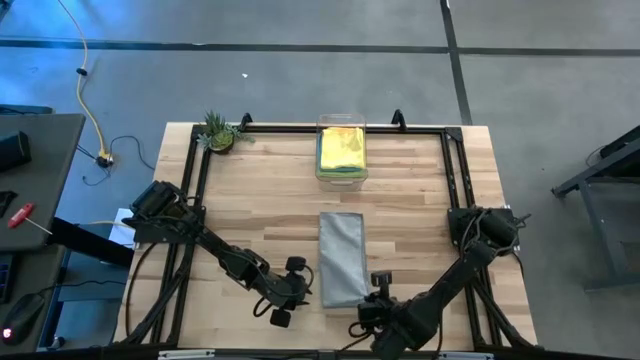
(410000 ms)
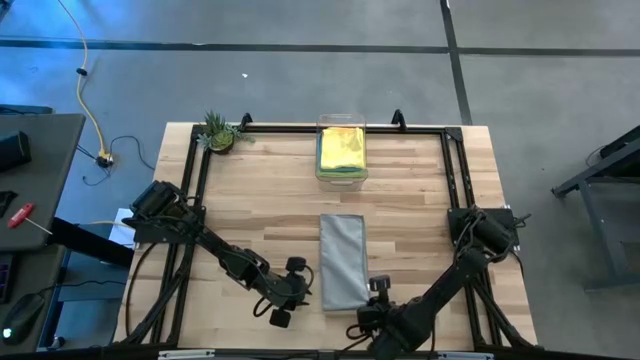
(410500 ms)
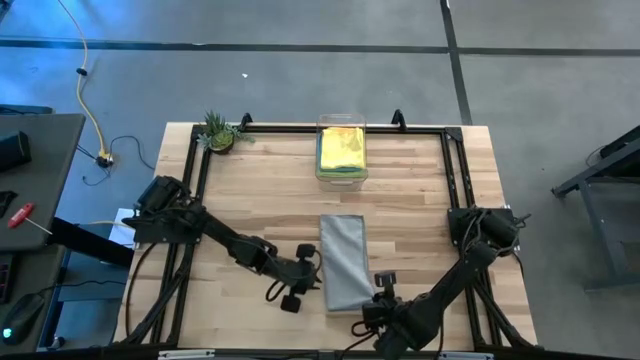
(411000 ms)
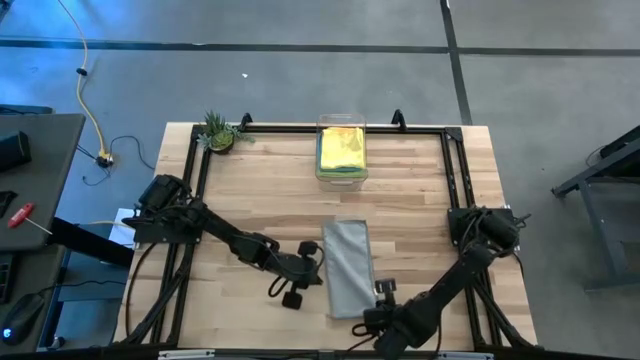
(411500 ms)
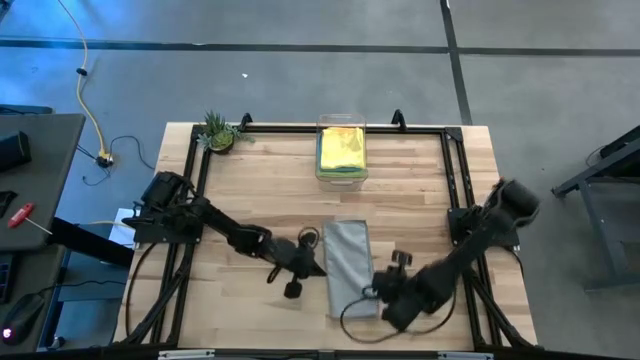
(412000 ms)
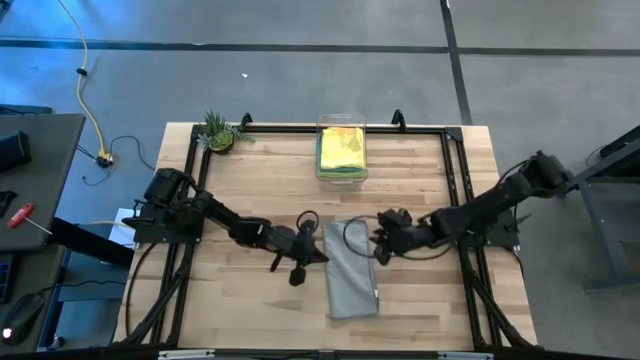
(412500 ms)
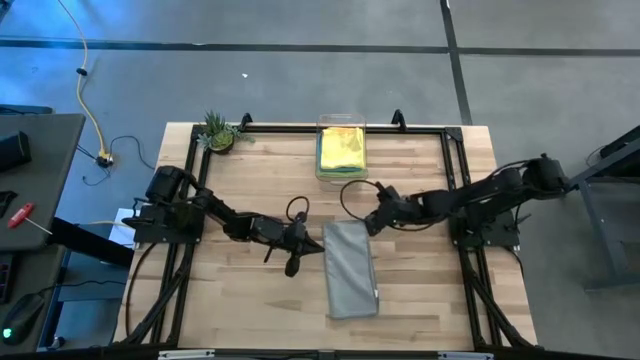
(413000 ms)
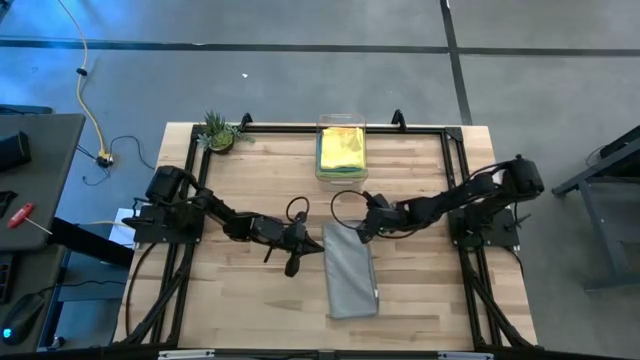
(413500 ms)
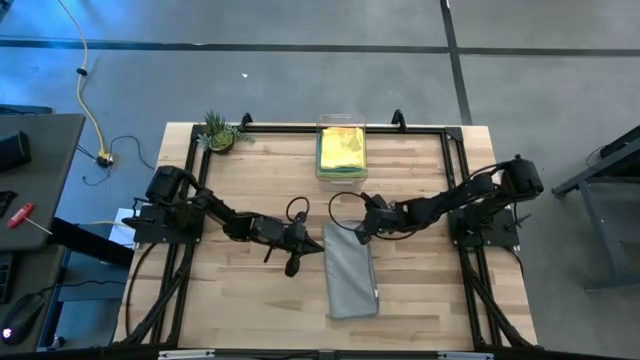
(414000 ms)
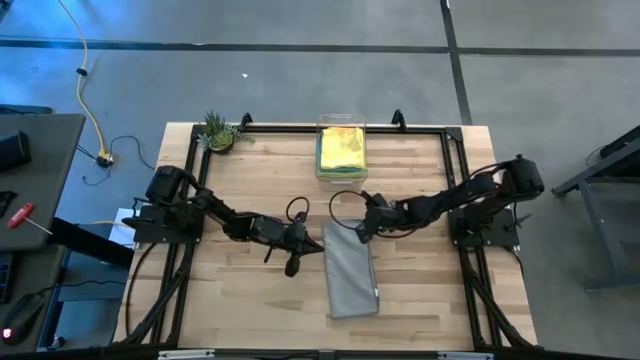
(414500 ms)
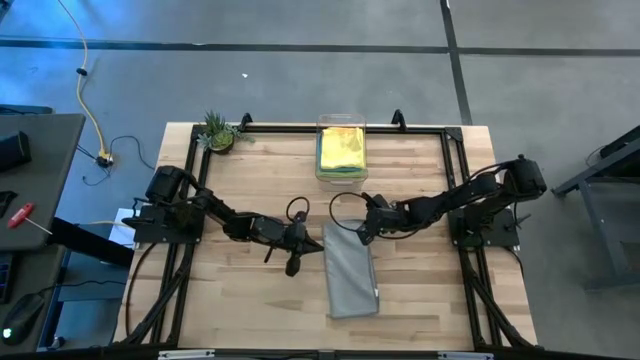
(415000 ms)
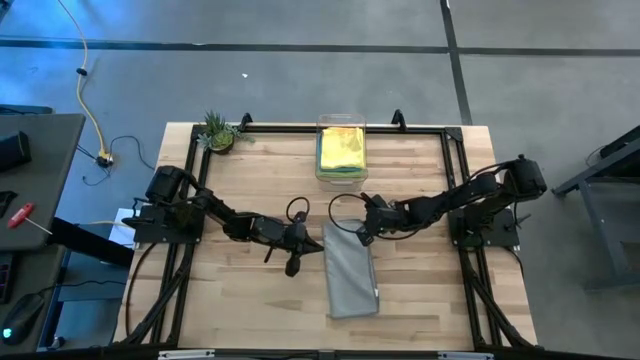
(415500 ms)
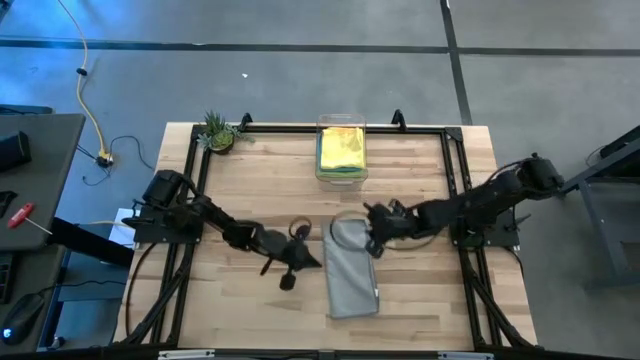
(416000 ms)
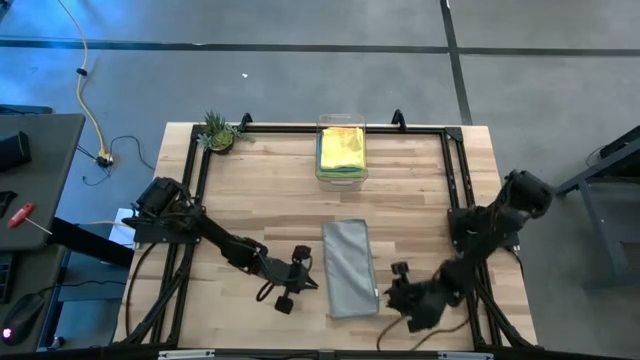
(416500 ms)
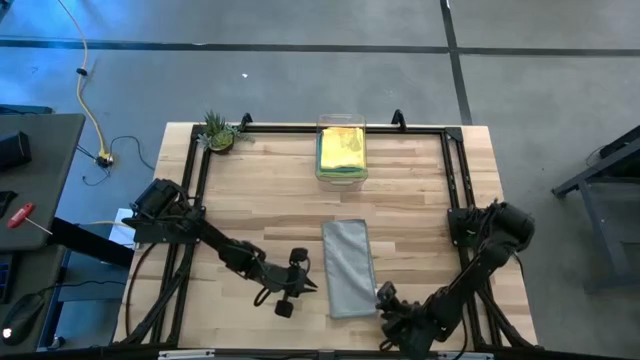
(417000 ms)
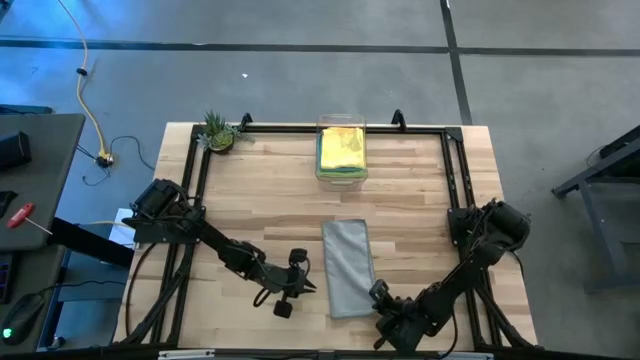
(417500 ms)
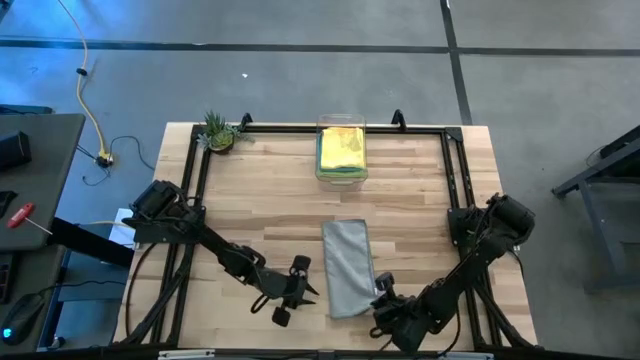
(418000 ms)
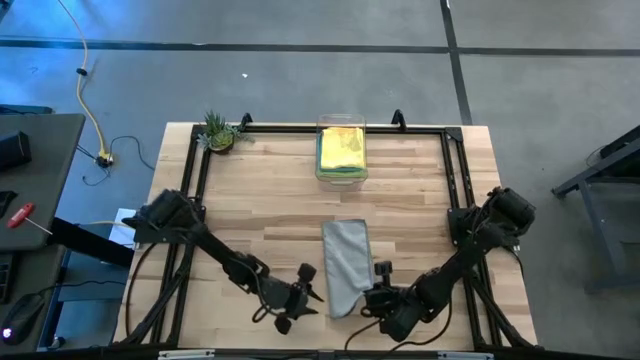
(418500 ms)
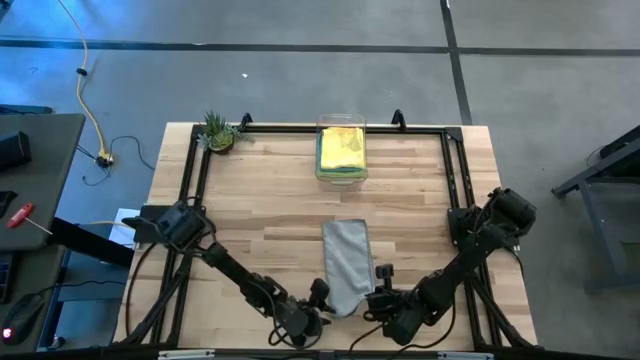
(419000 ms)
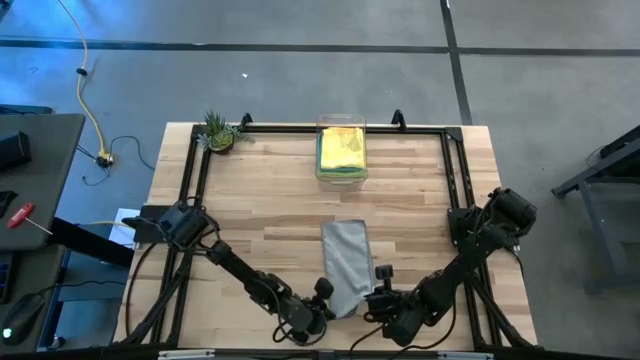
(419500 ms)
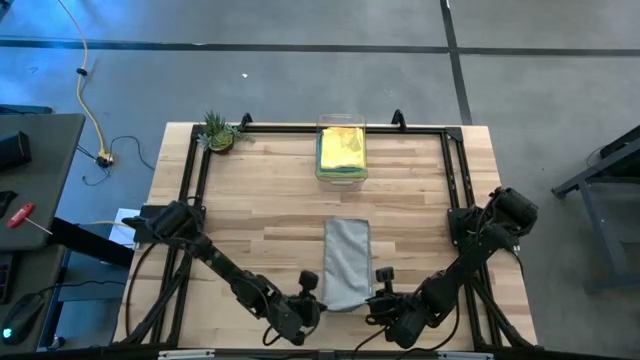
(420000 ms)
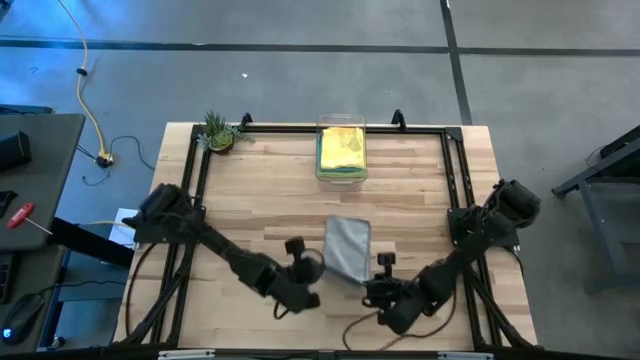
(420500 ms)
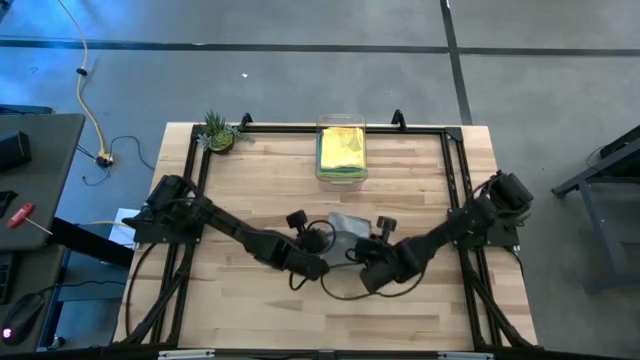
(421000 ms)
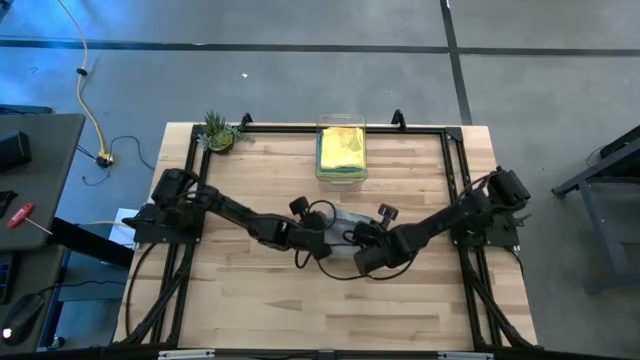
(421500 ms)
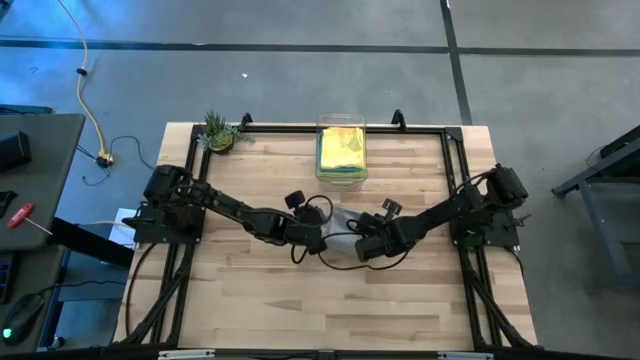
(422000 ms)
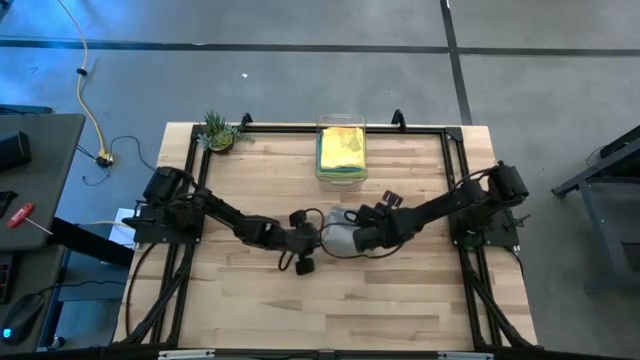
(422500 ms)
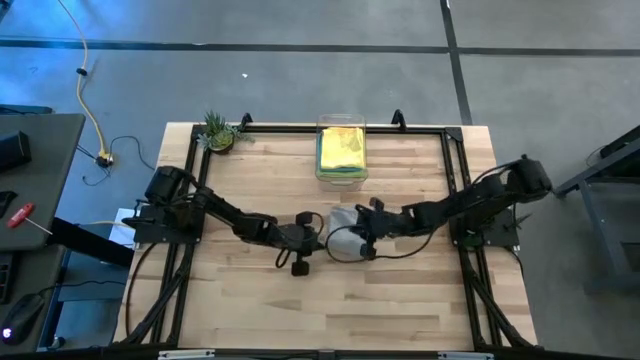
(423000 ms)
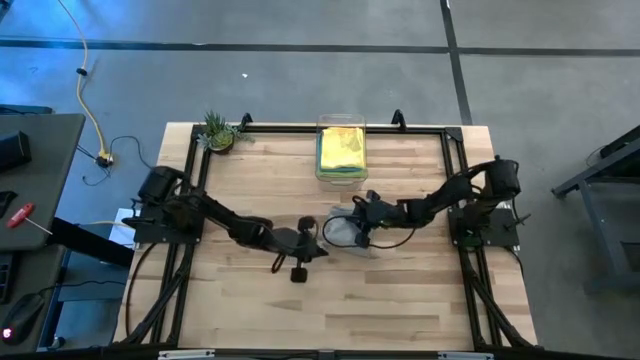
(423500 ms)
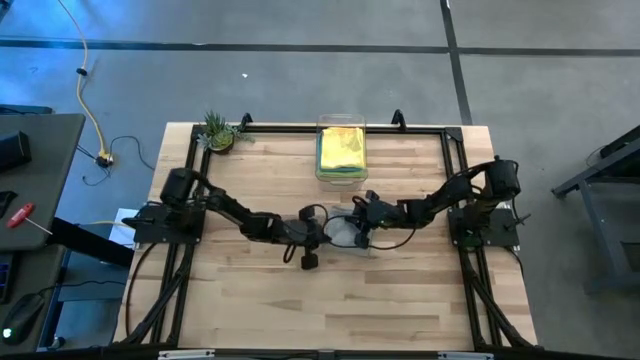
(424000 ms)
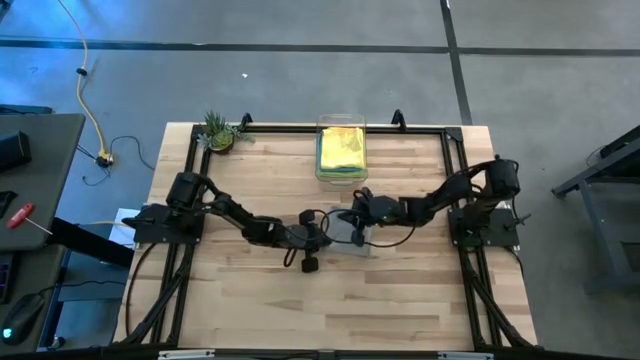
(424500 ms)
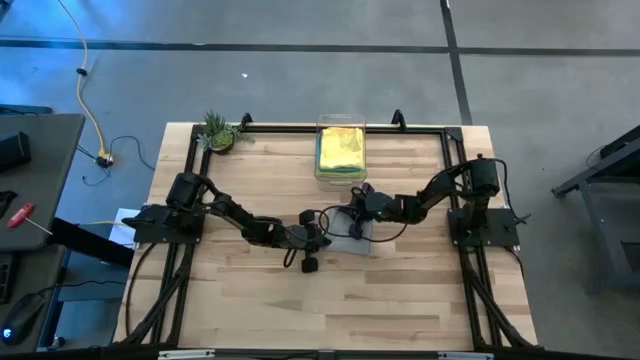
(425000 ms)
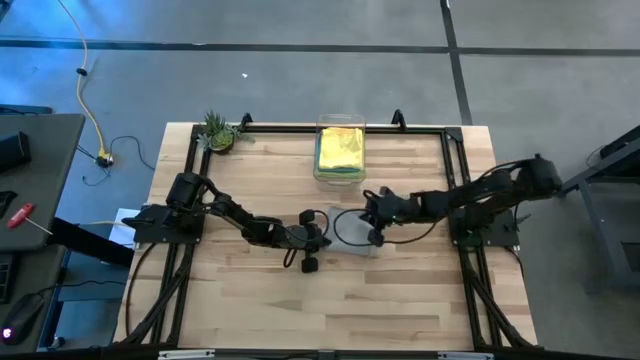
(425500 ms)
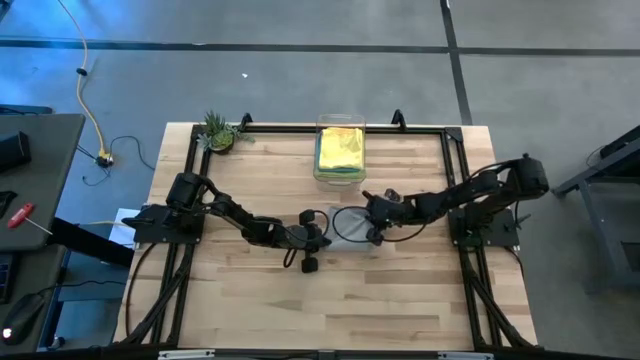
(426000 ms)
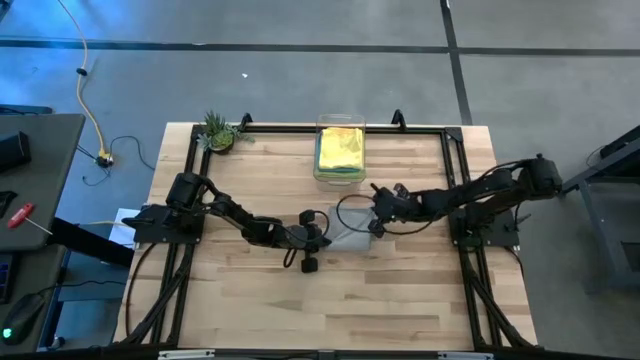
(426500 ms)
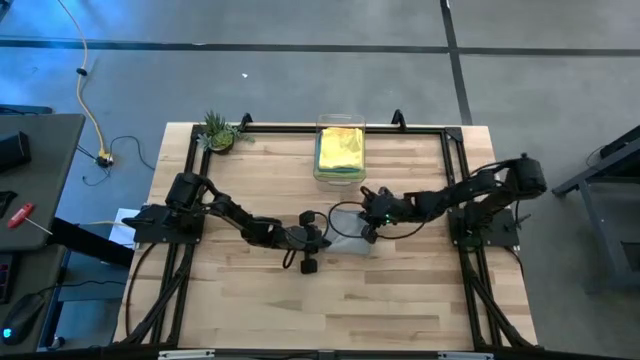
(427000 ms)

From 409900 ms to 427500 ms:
Task: Fold microfiber towels
Fold the gray microfiber cloth

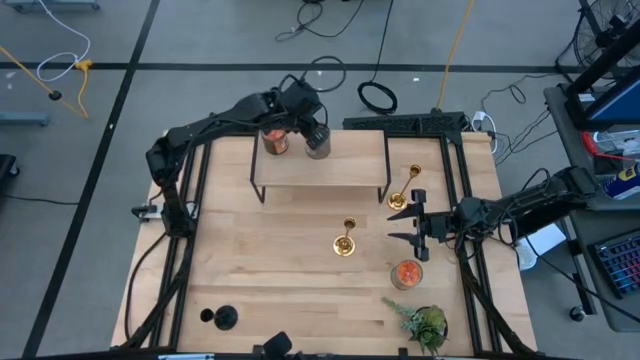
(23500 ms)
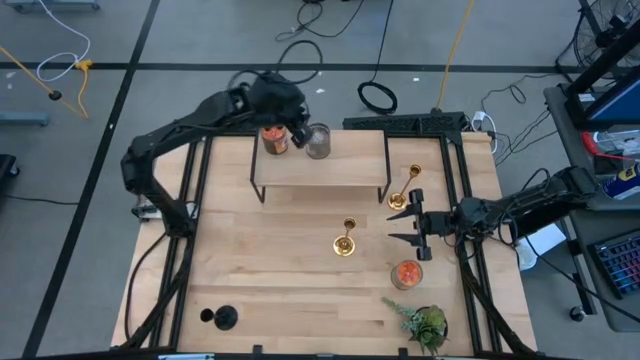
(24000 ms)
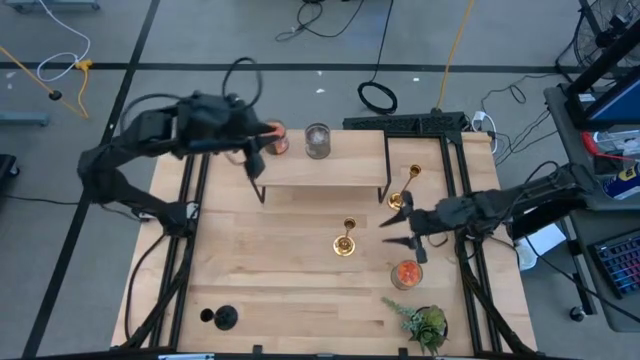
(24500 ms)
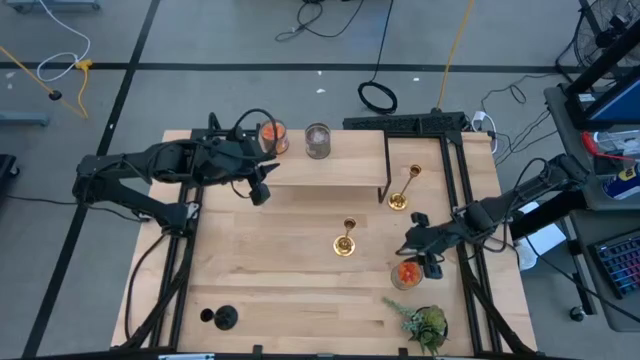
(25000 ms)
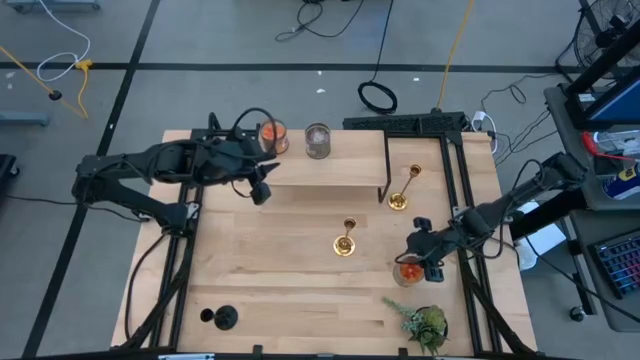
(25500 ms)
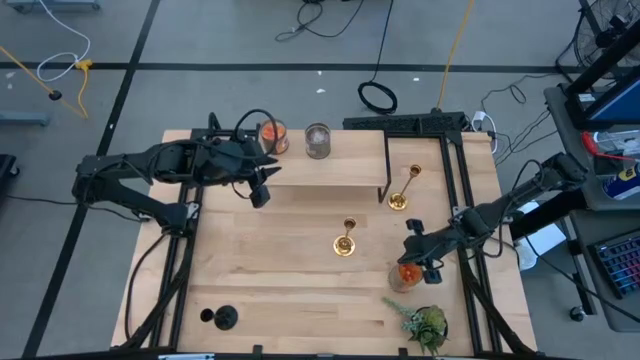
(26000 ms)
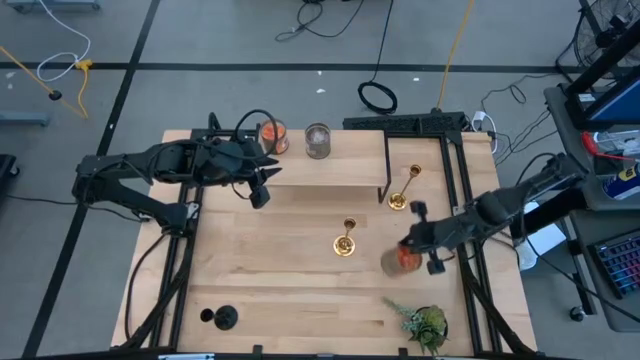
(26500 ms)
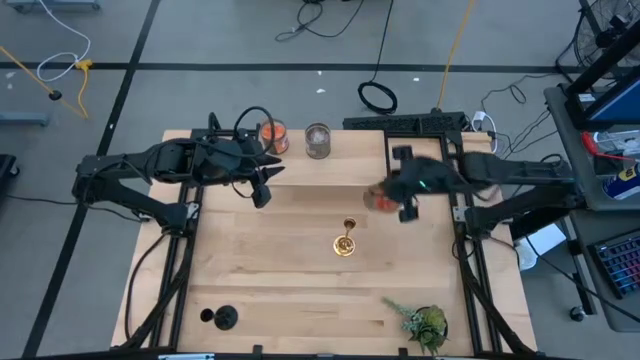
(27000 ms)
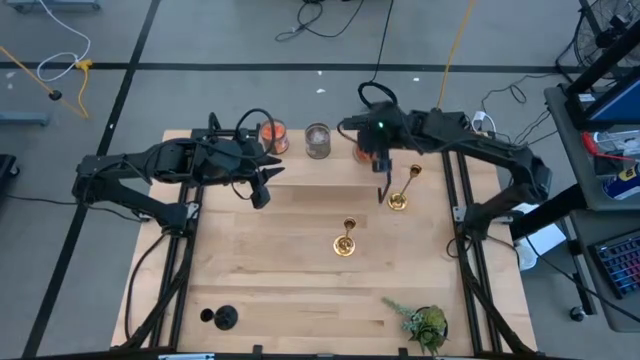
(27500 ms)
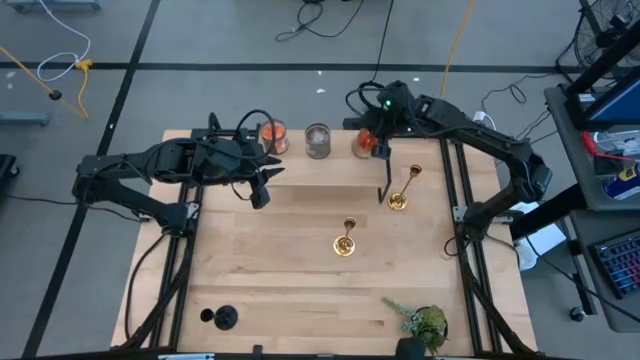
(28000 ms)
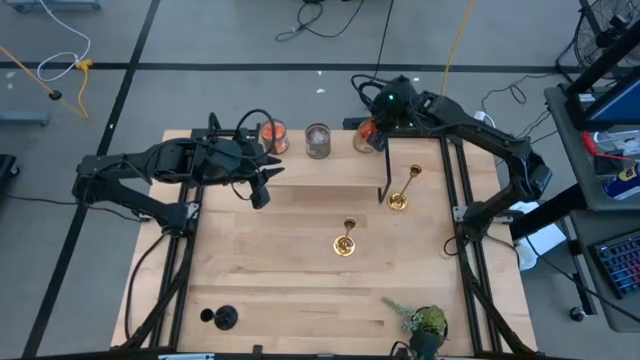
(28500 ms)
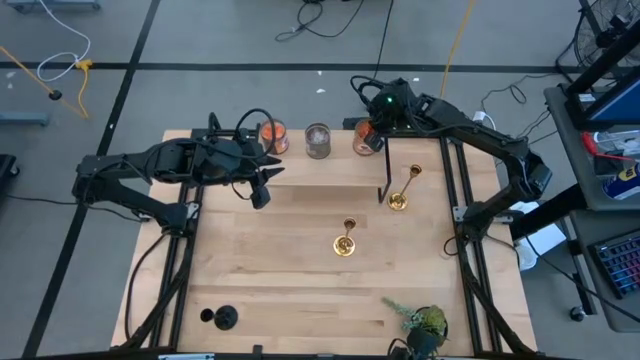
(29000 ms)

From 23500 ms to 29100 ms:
Task: Pick & Place candle stick holders
Put the orange candle on the shelf
